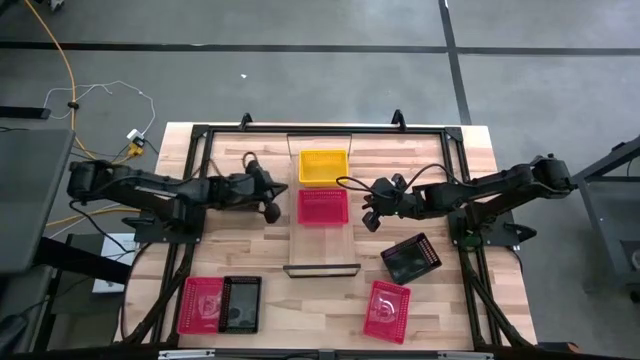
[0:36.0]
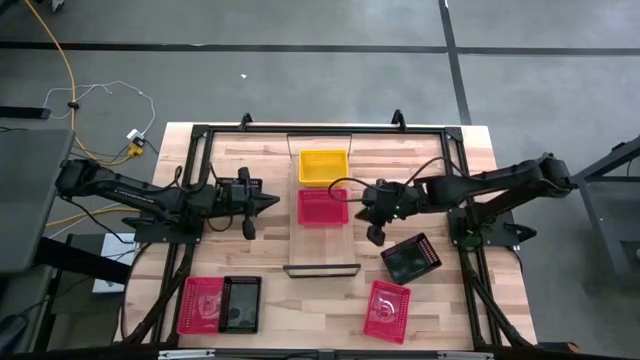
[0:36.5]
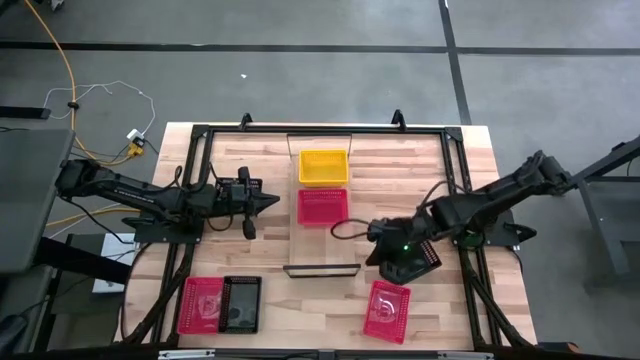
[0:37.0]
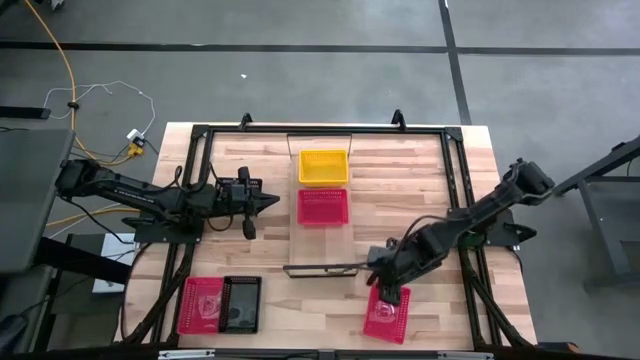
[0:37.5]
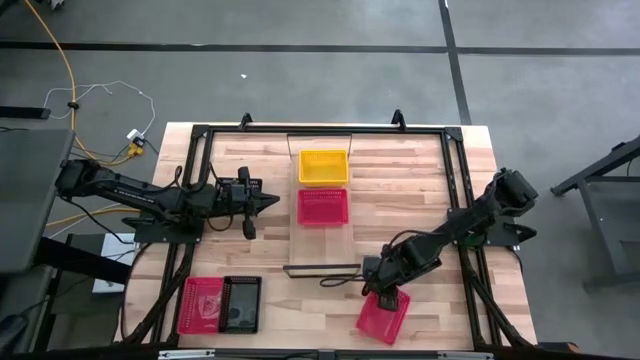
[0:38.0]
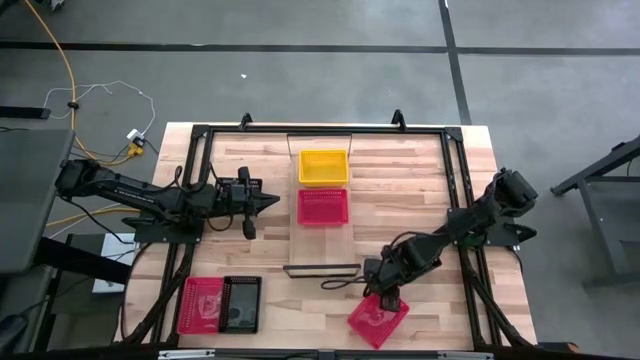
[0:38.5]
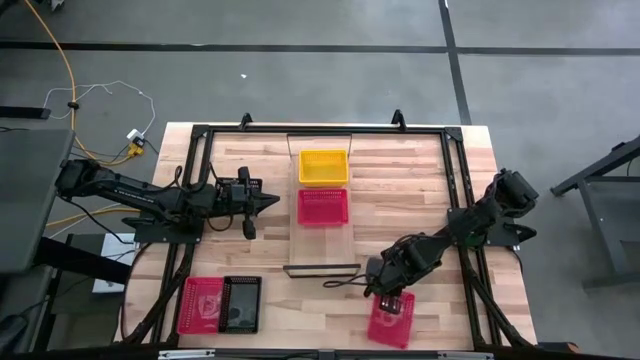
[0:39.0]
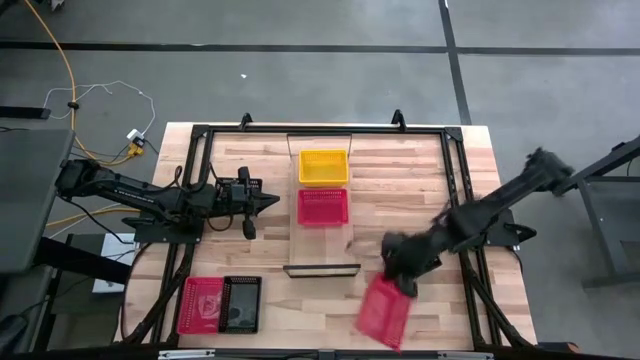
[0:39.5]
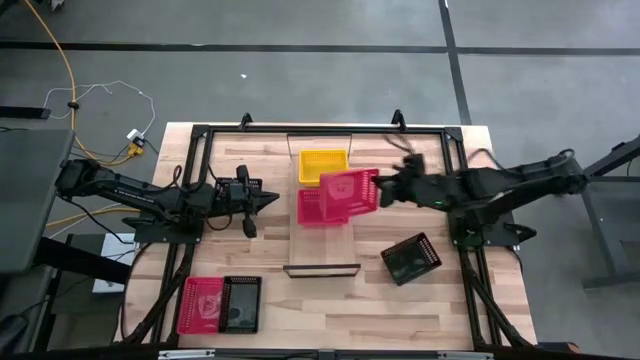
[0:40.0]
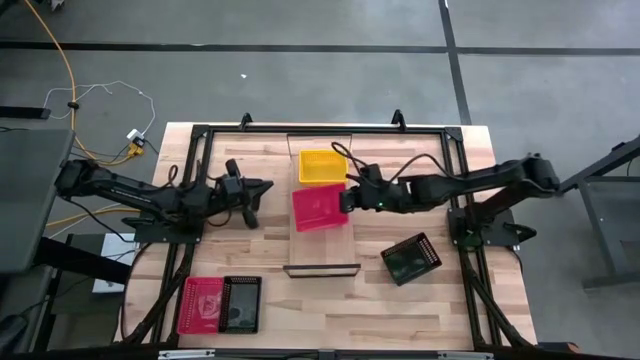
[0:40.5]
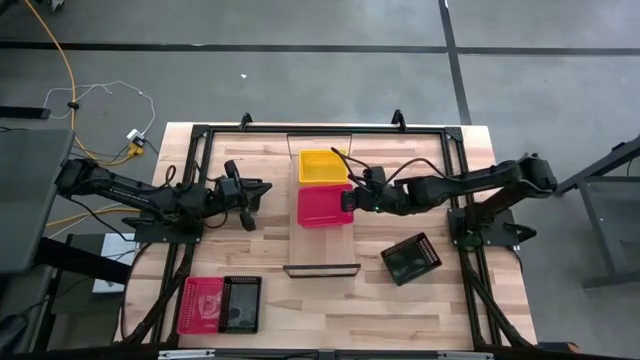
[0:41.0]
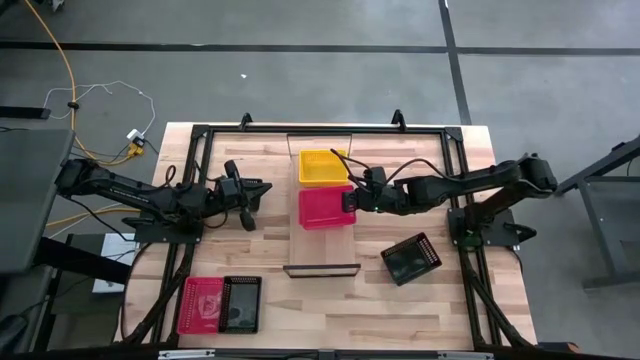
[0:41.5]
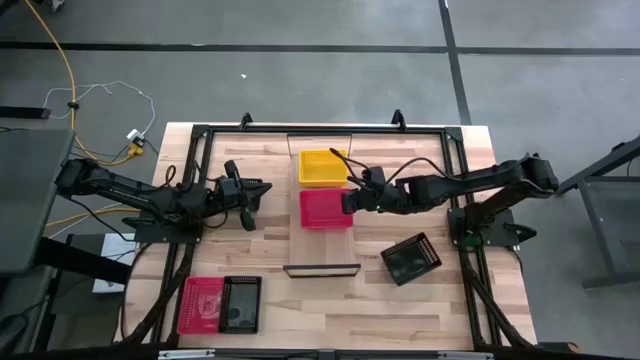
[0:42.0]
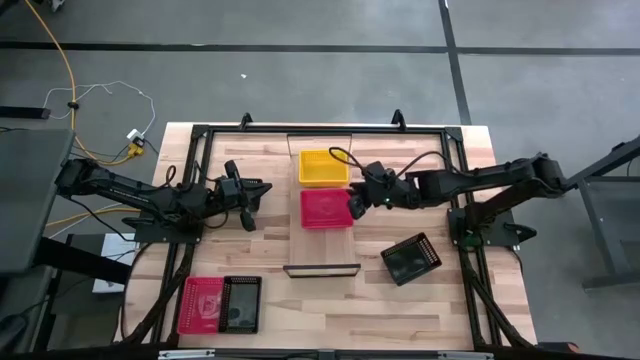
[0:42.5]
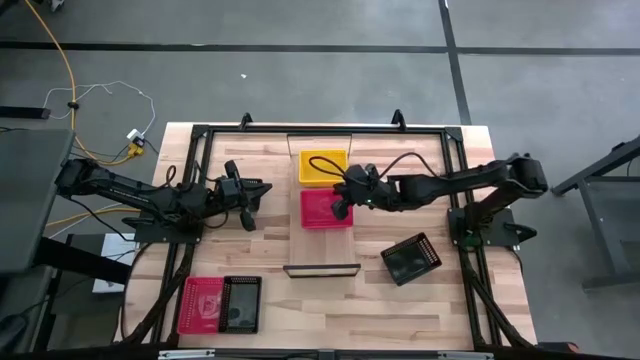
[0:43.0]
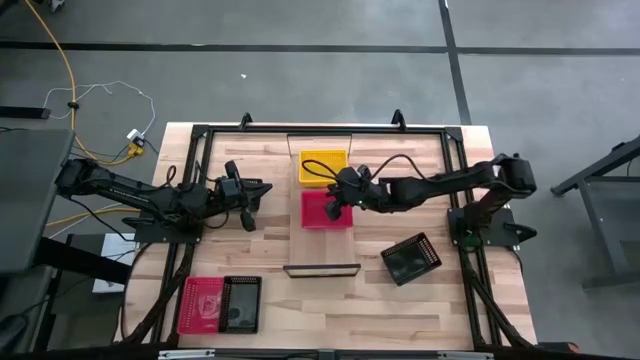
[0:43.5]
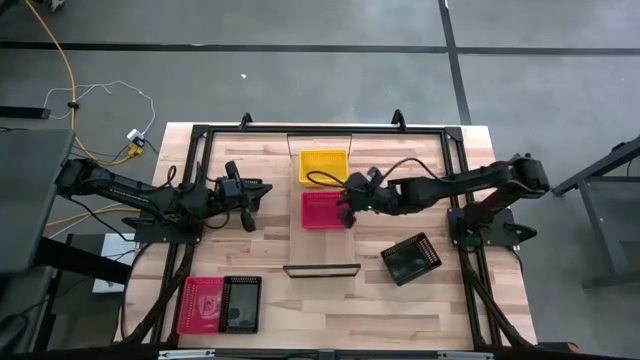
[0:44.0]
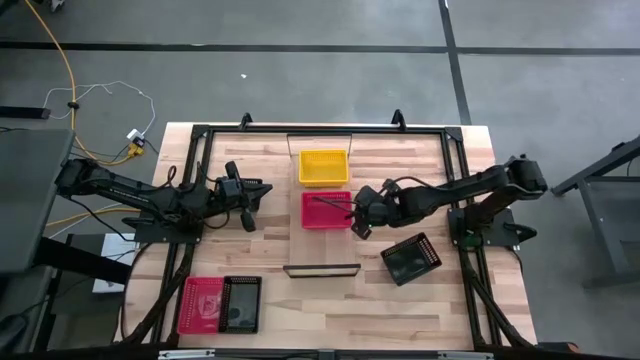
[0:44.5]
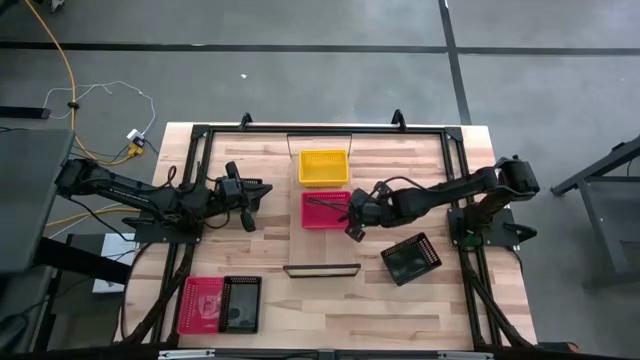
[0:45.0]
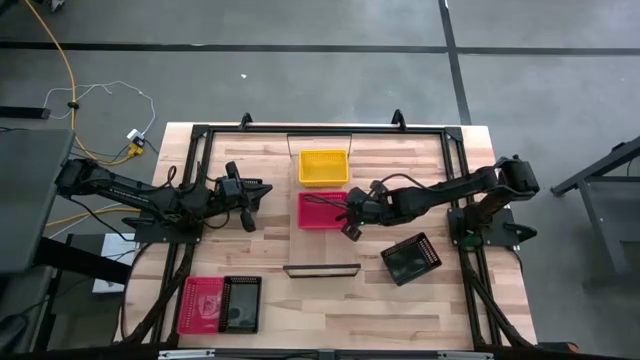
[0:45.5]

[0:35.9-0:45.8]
Task: Stack baskets on shelf by color
Stack the right red bin on the red bin on the shelf

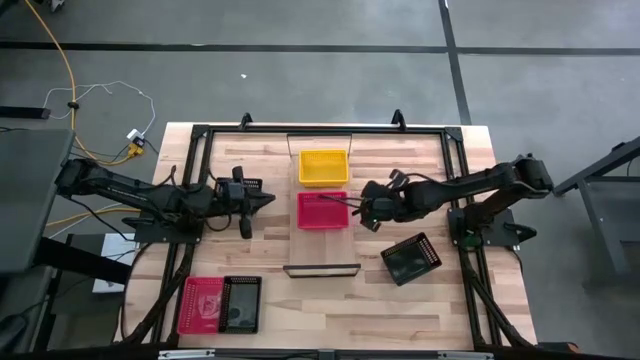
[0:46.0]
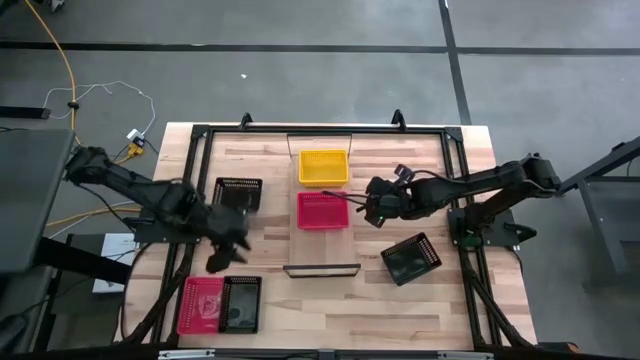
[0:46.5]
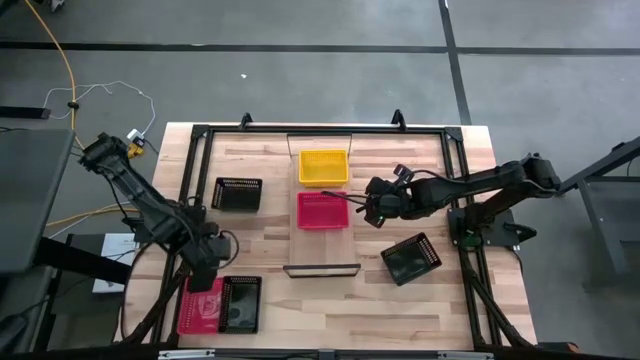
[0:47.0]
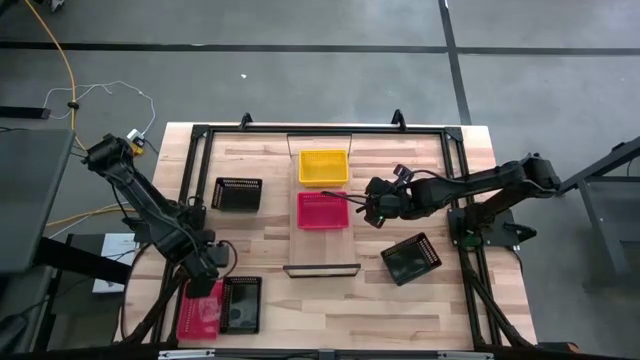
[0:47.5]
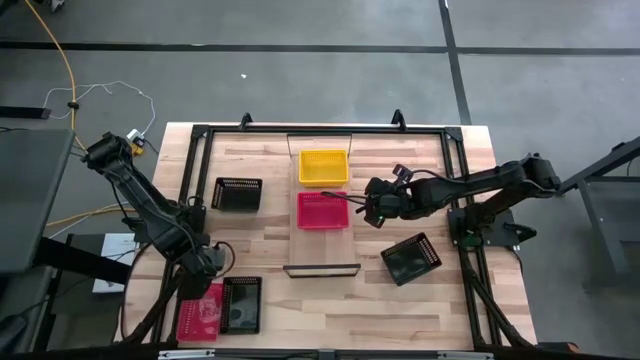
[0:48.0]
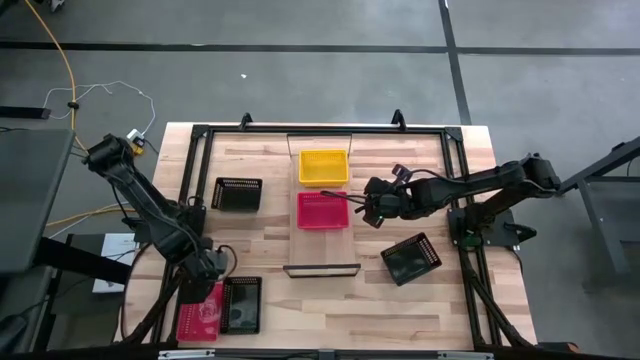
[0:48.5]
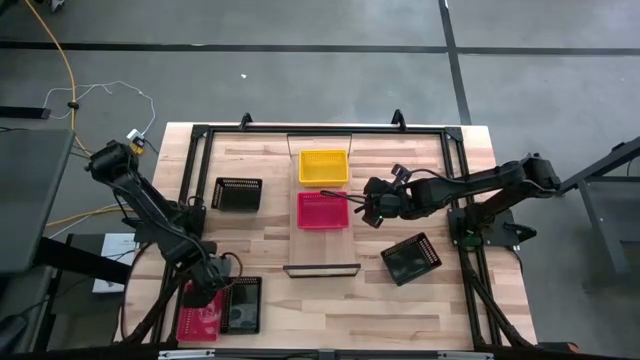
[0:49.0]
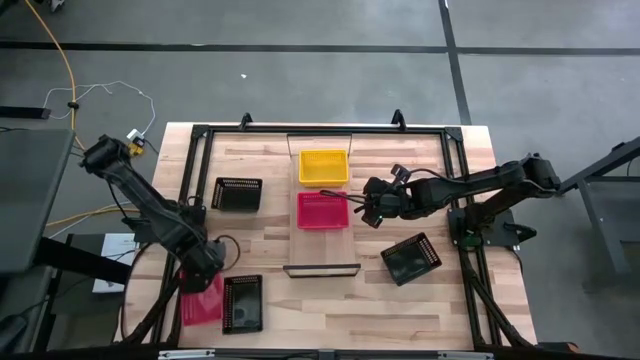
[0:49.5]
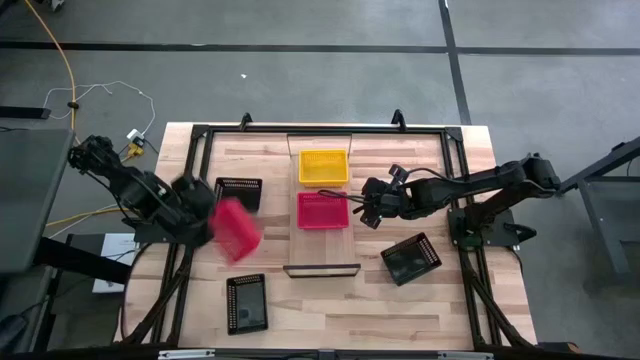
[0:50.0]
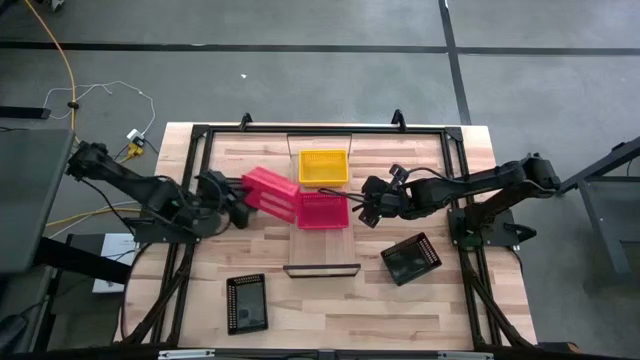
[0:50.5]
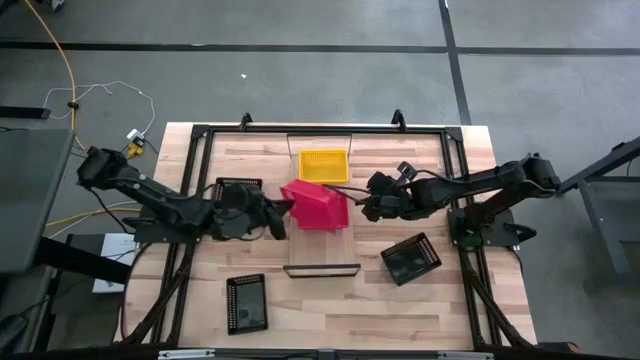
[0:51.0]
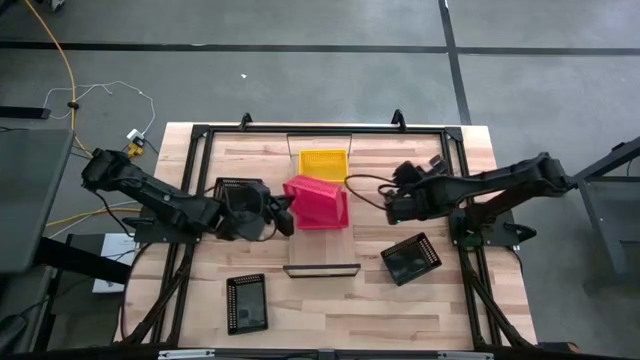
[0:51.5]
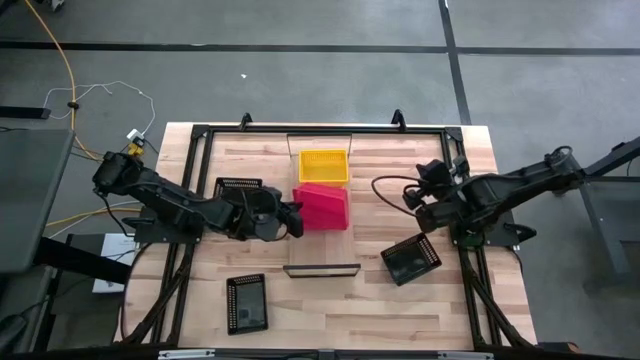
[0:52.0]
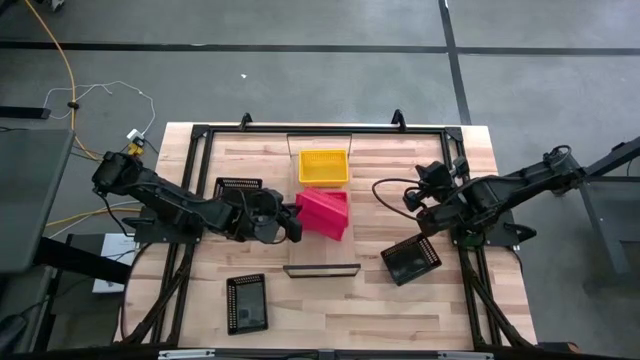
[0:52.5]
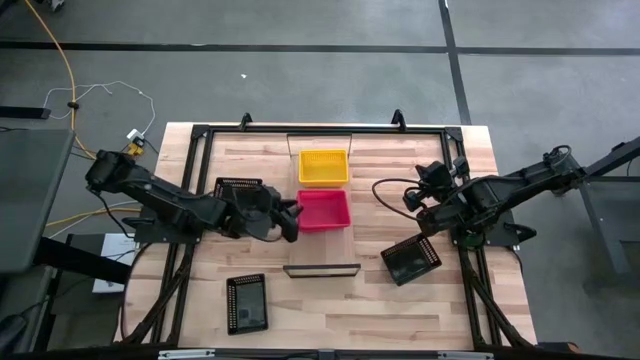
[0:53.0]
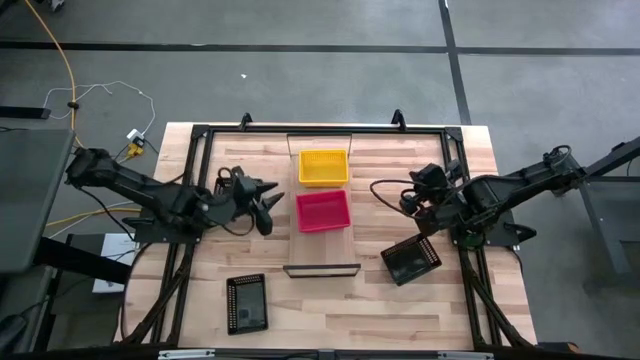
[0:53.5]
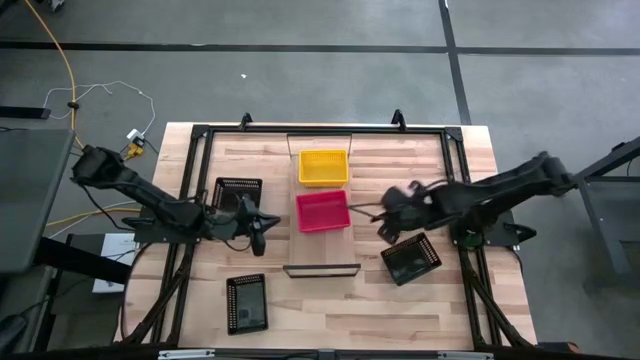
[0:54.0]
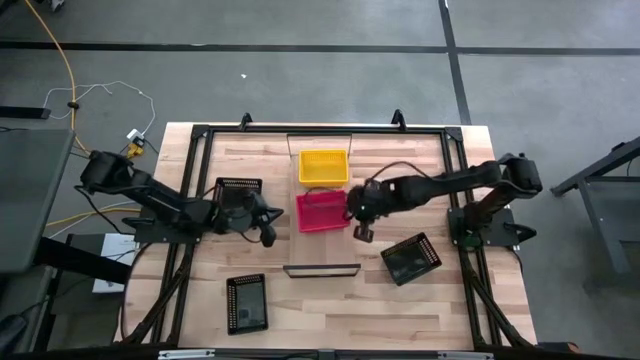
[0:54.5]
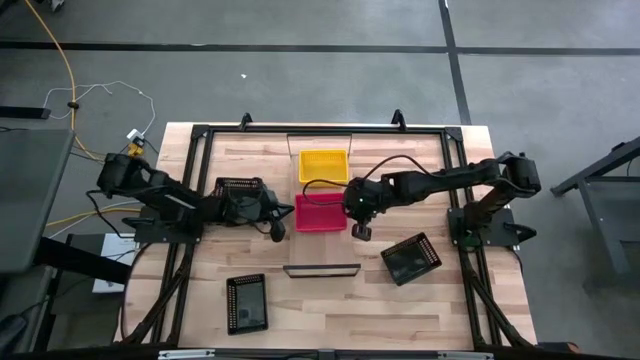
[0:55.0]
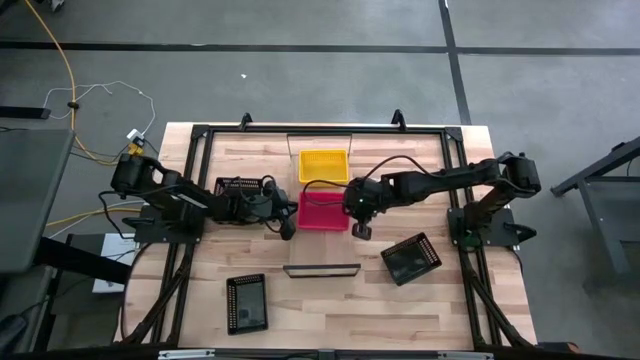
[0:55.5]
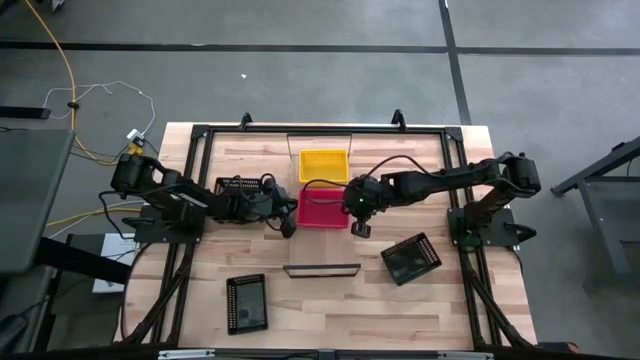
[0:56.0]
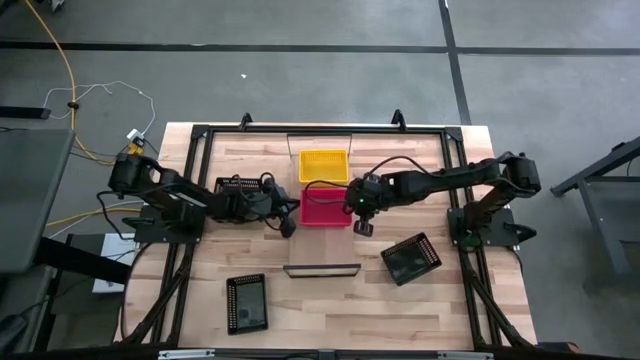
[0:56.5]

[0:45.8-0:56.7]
Stack the red bin on the red bin on the shelf
